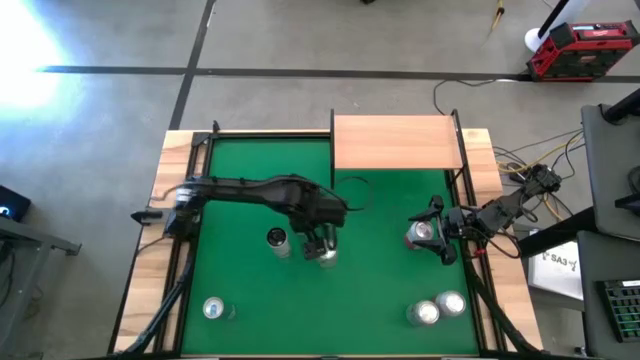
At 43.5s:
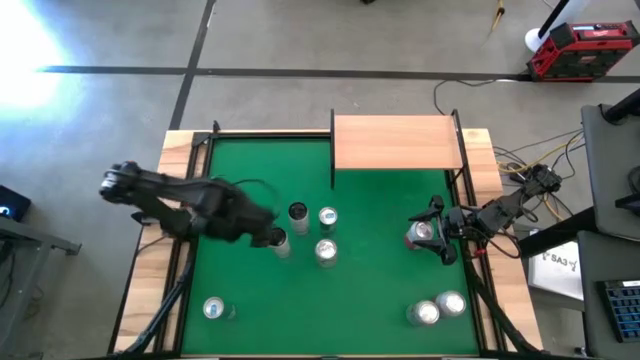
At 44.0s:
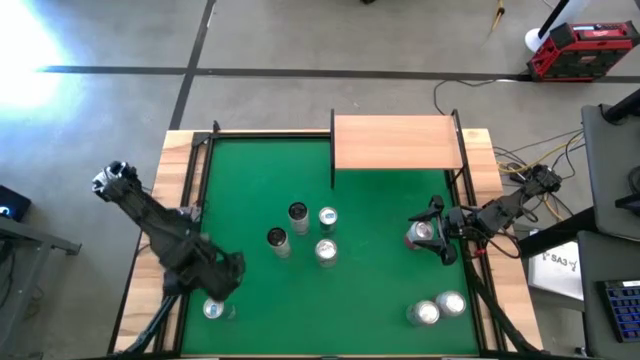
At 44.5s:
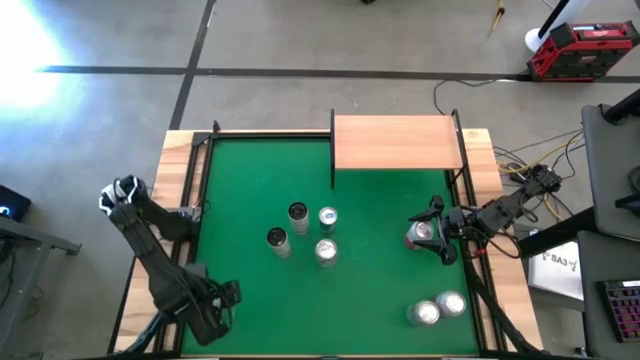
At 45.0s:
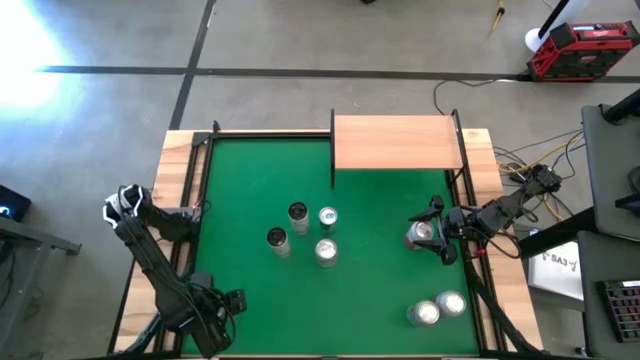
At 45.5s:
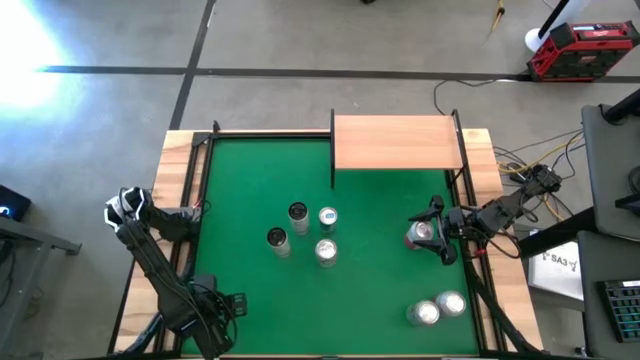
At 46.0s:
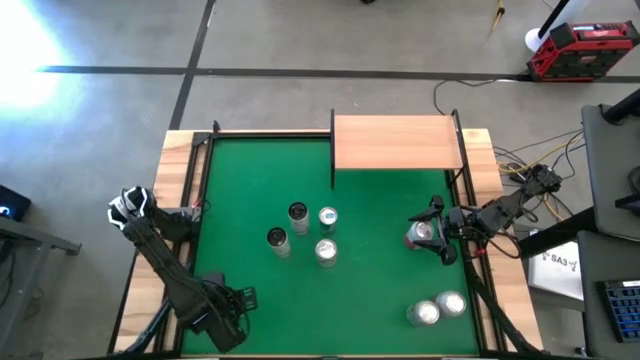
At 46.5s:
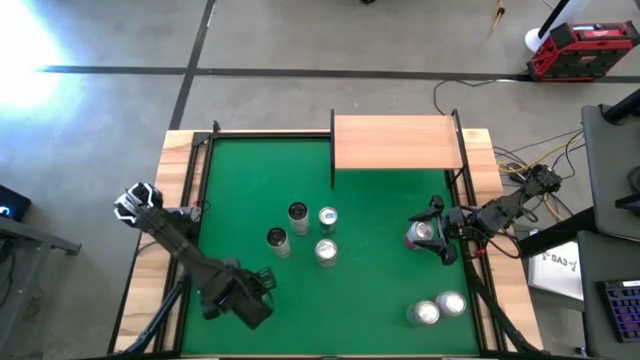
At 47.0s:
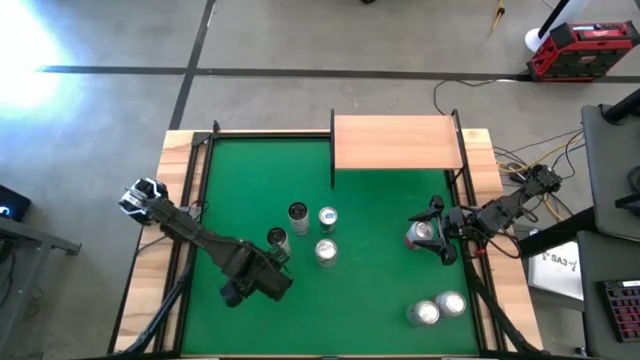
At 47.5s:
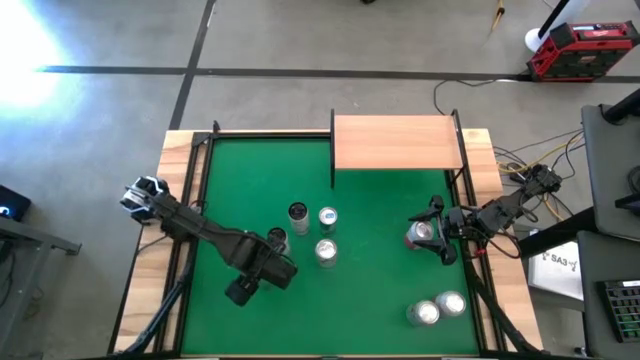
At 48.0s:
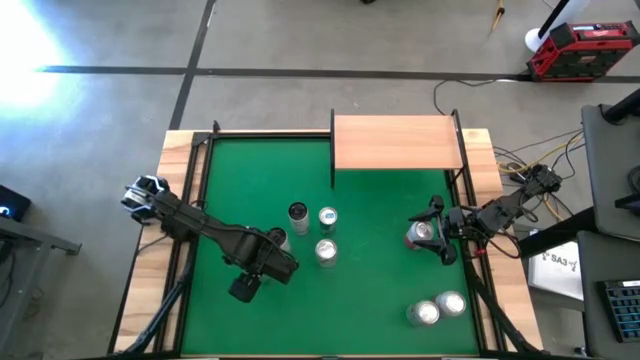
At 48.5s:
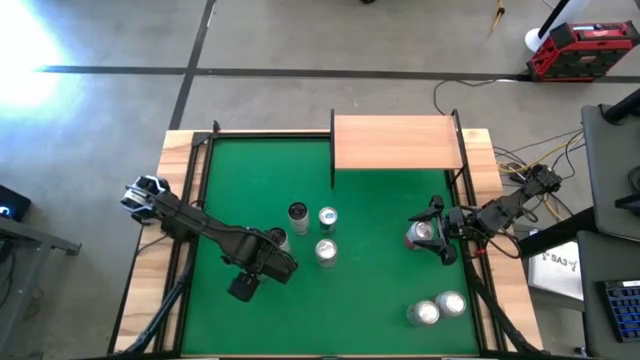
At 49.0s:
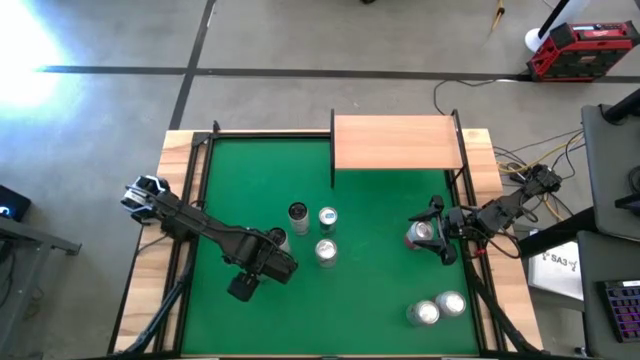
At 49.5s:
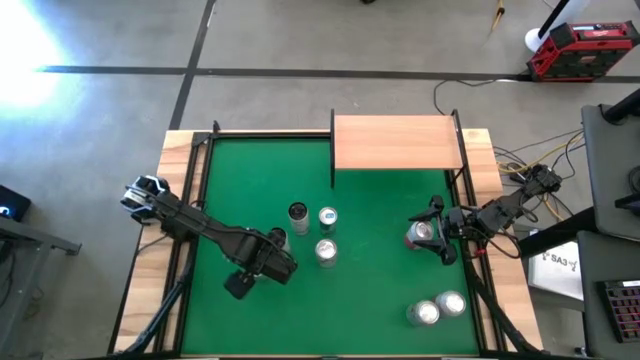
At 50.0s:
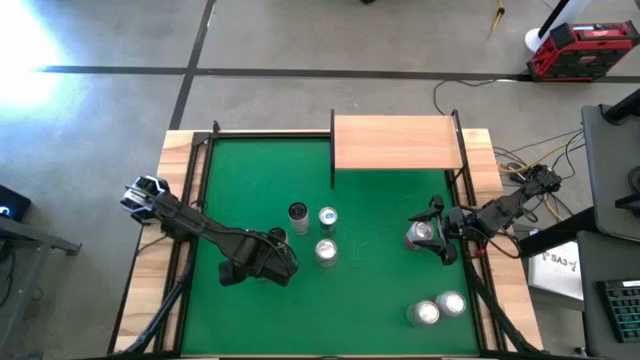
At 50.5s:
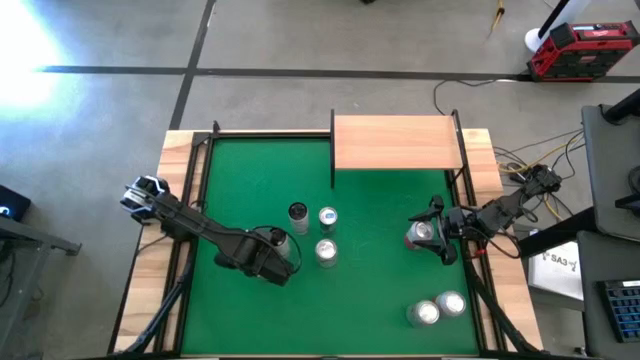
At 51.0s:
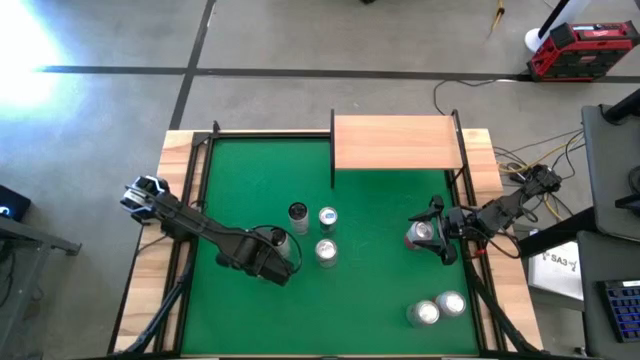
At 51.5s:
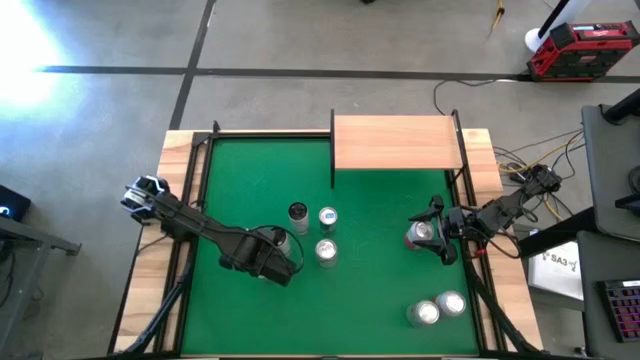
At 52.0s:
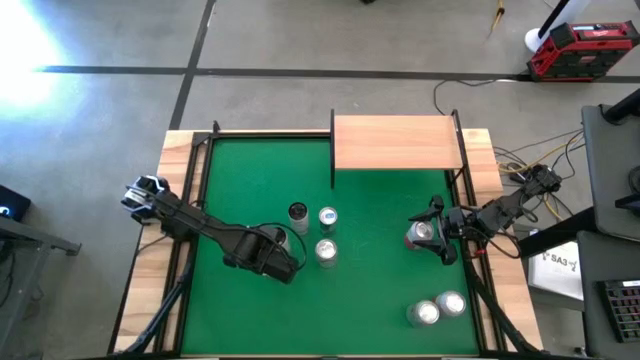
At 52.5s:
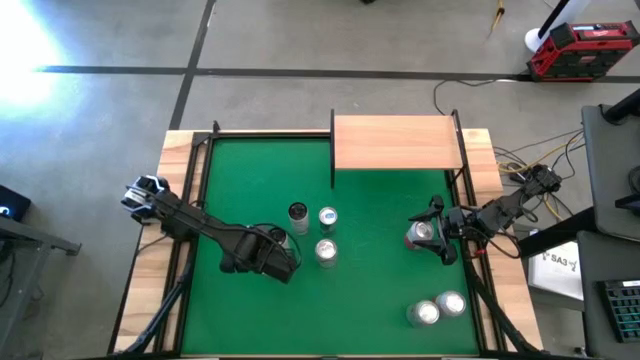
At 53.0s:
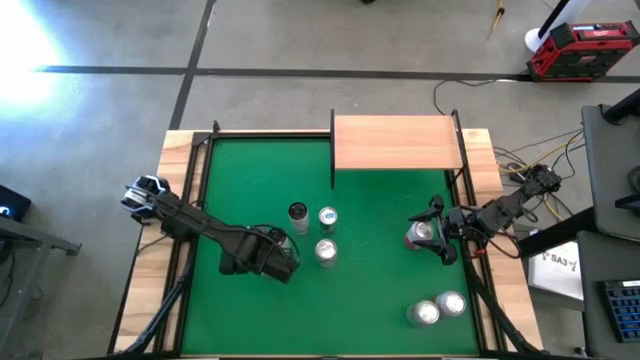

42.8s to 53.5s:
Task: Place canned beverage on shelf
Move the bottom blue soda can to the middle left of the table

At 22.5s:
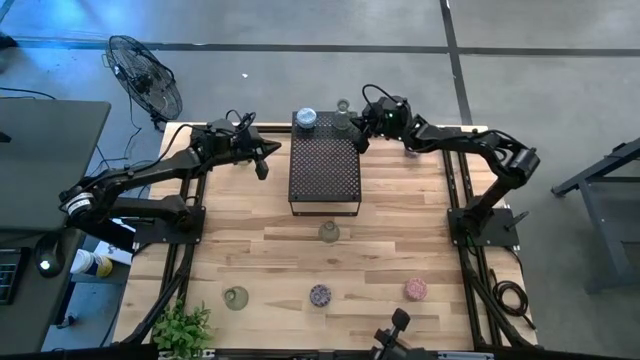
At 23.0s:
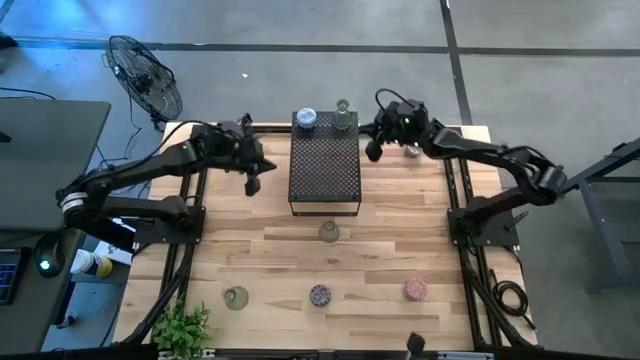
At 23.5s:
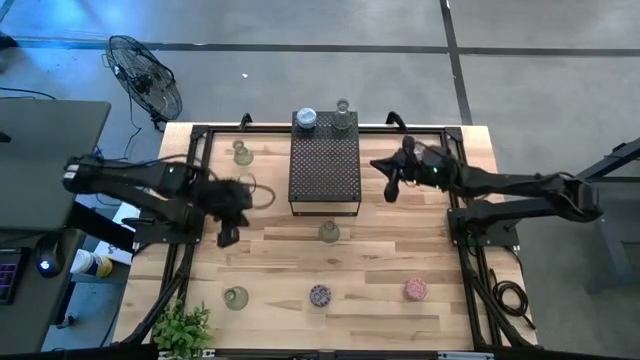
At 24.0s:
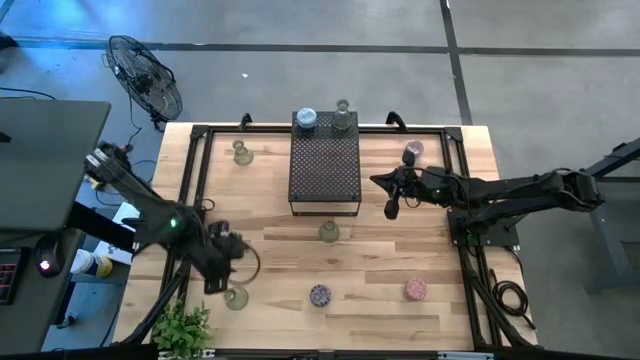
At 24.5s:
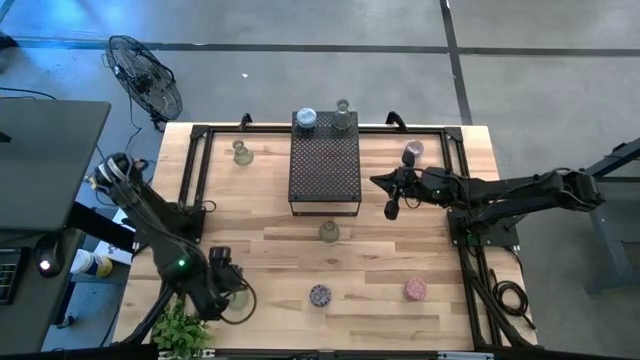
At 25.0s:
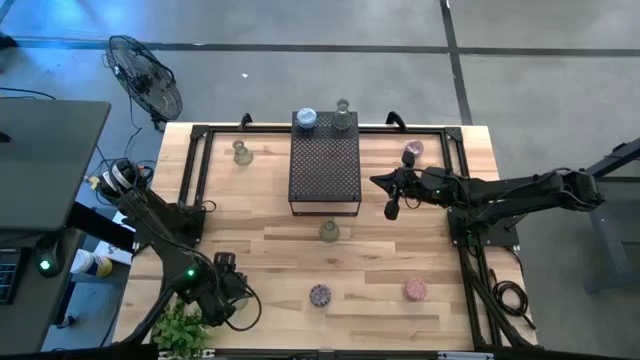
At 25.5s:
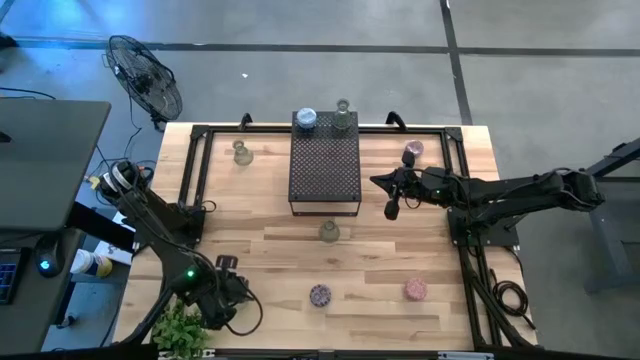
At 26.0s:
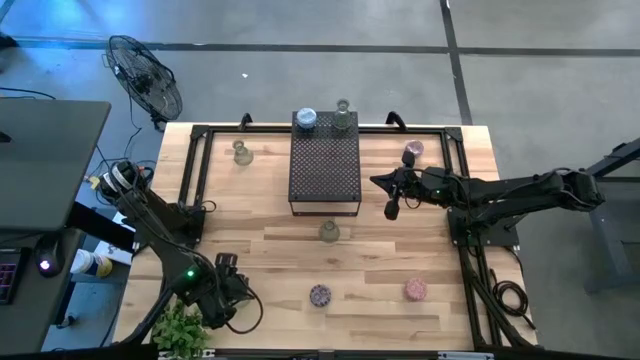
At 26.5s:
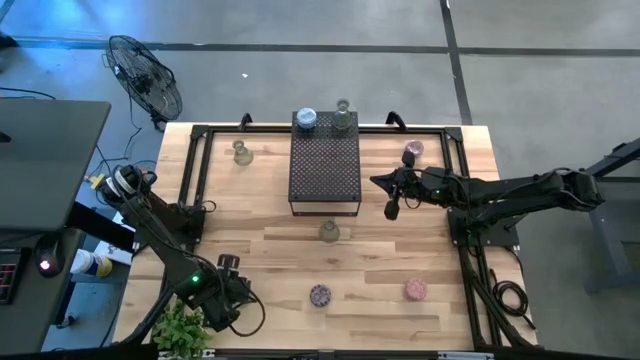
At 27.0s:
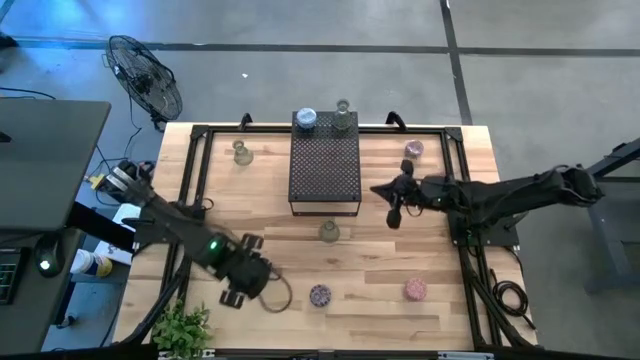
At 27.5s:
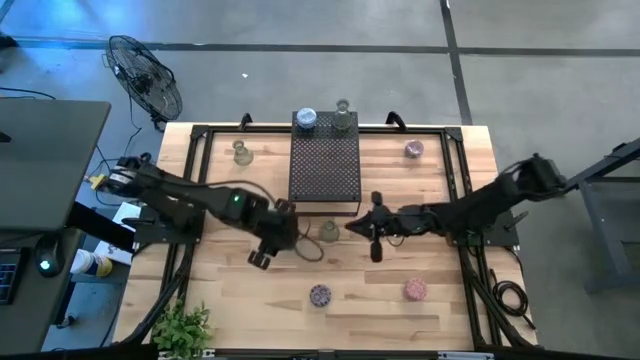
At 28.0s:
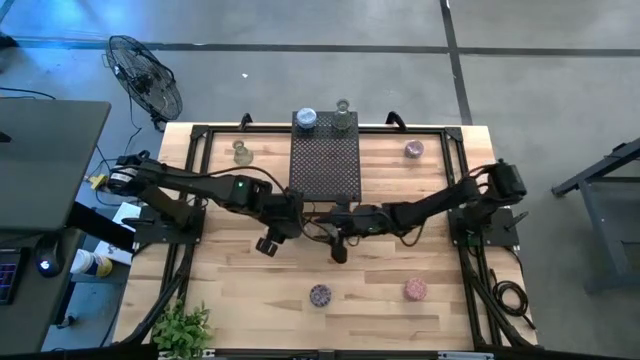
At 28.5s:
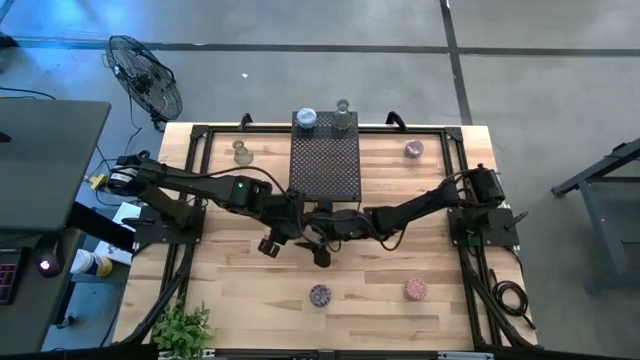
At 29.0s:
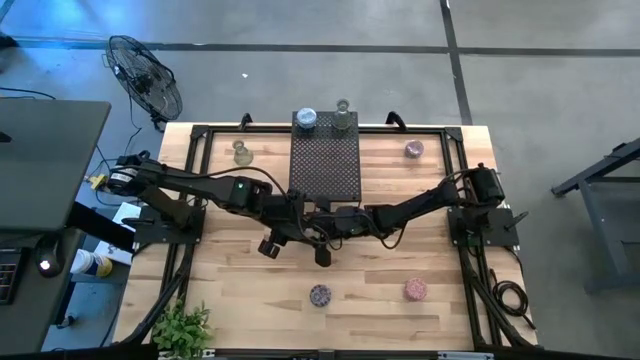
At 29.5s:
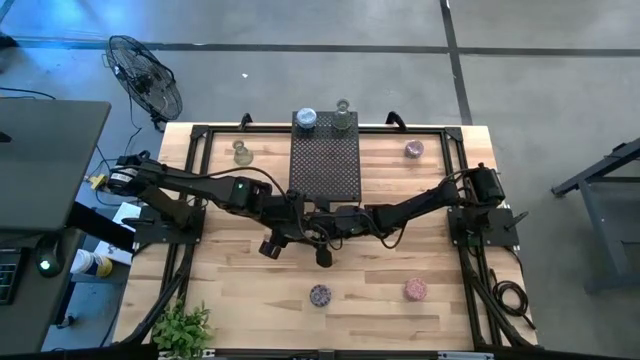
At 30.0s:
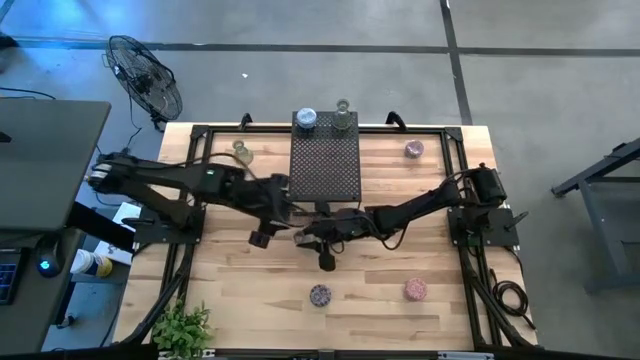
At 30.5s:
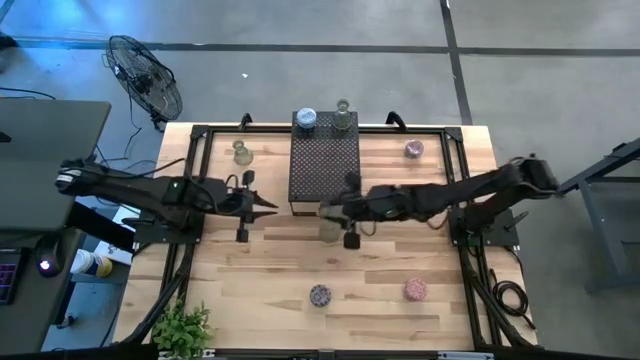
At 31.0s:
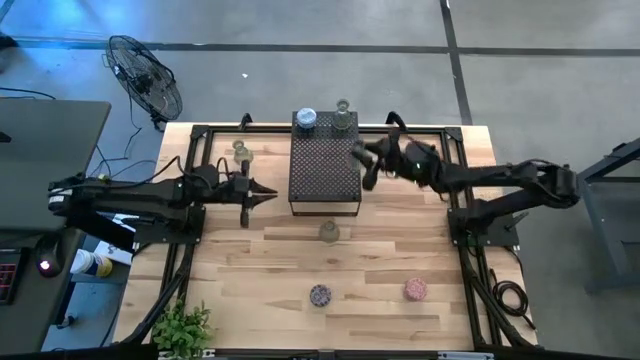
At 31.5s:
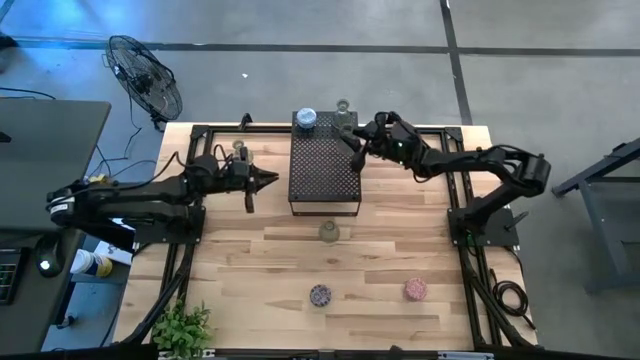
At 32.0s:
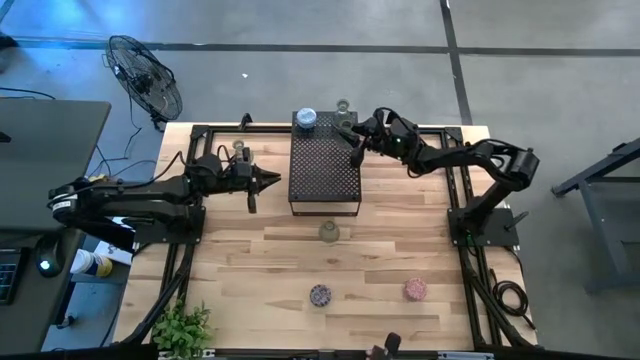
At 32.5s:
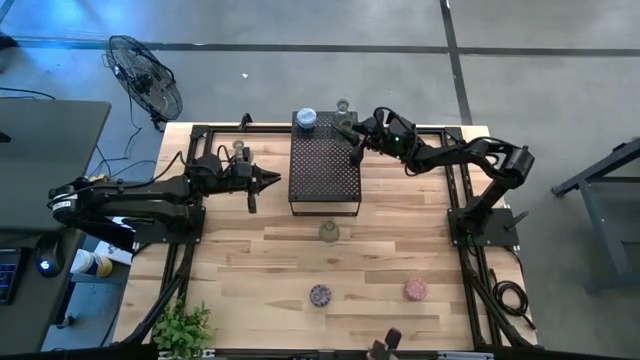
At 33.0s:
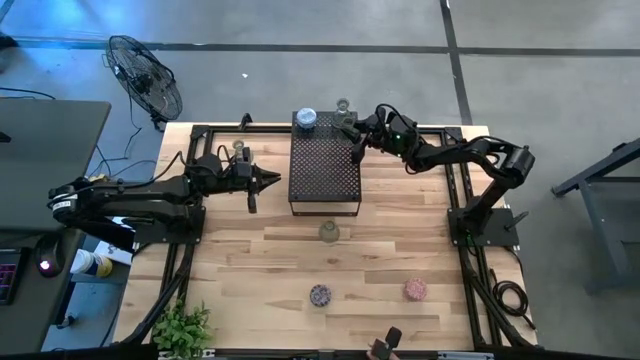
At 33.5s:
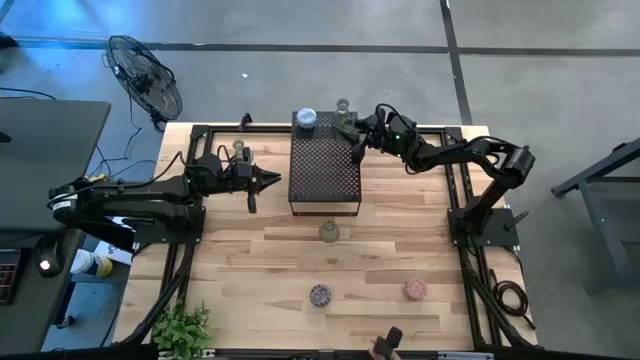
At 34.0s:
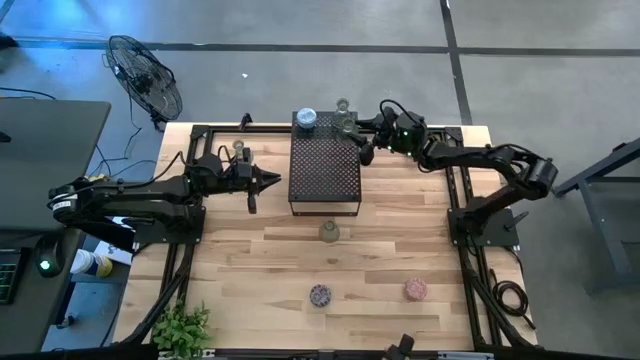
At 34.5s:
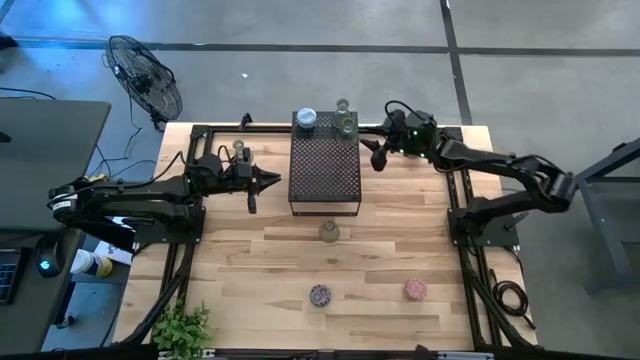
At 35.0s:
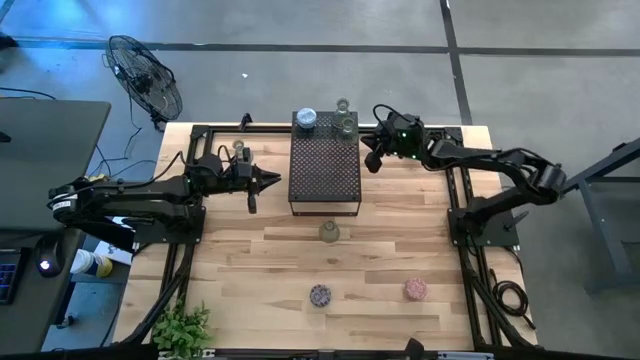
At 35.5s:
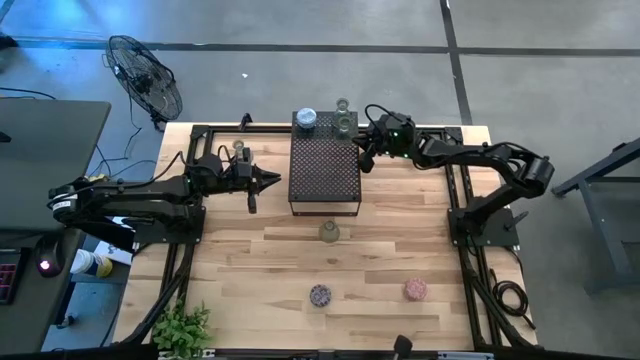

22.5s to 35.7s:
Task: Pick & Place candle stick holders
Put the green glass candle holder on the shelf aligned with the other green glass candle holder
